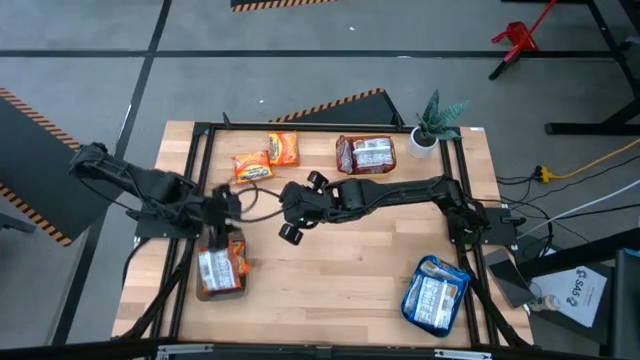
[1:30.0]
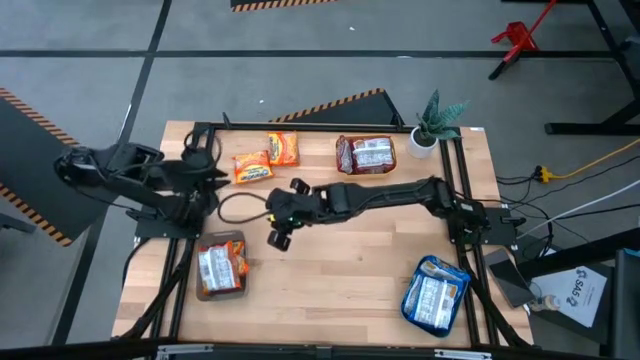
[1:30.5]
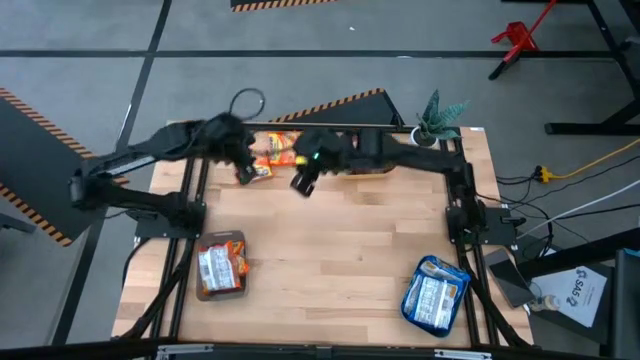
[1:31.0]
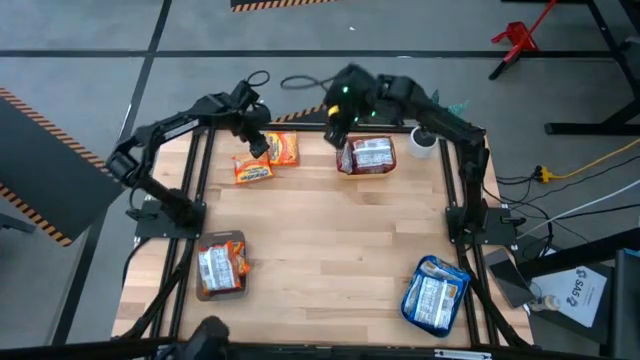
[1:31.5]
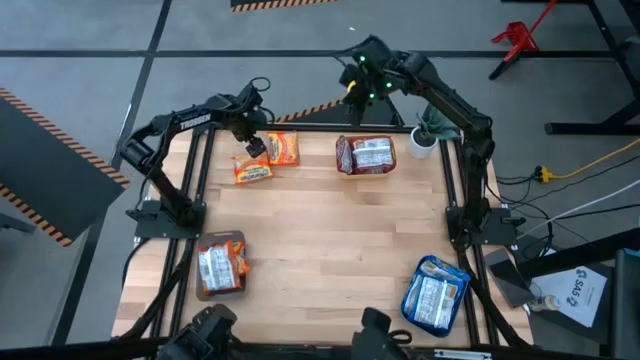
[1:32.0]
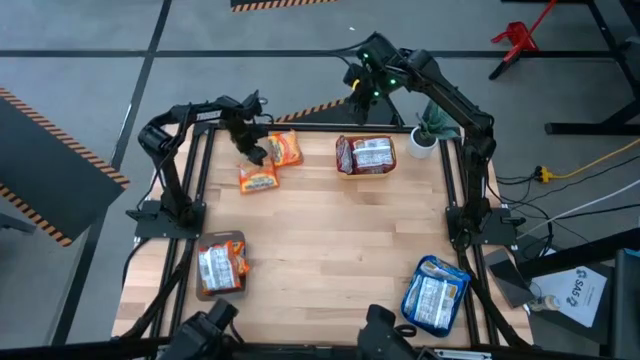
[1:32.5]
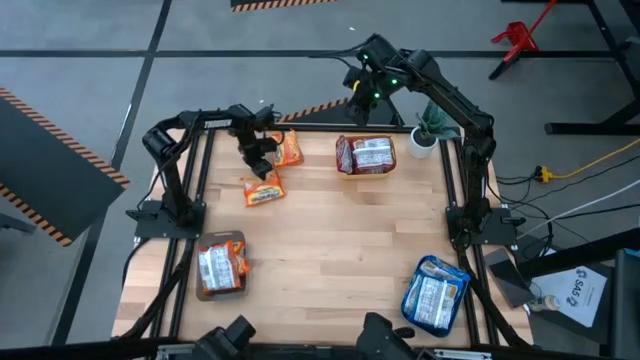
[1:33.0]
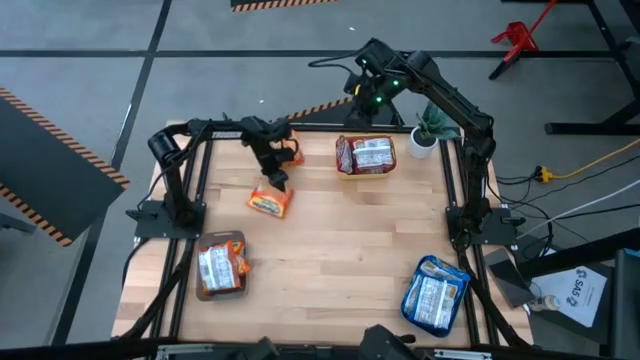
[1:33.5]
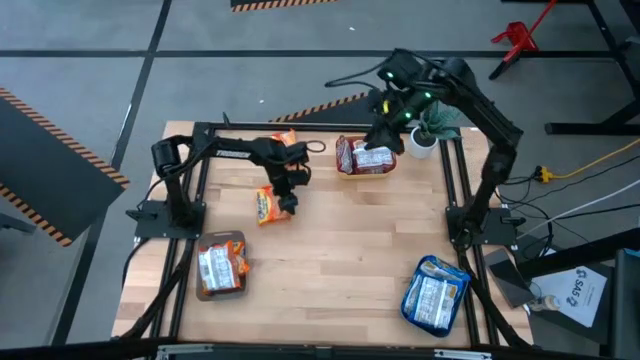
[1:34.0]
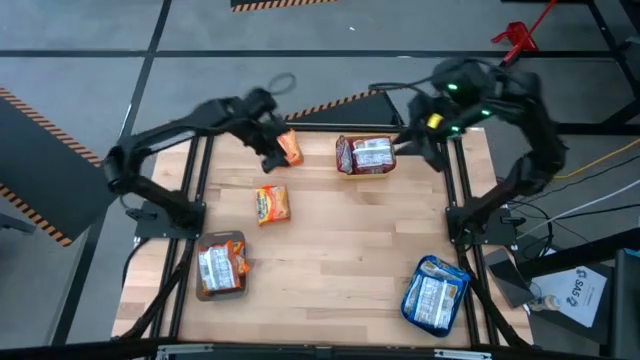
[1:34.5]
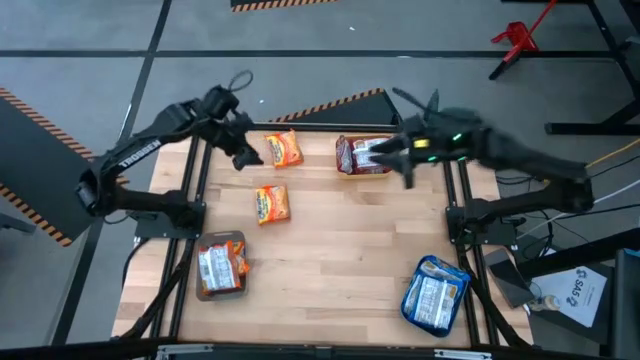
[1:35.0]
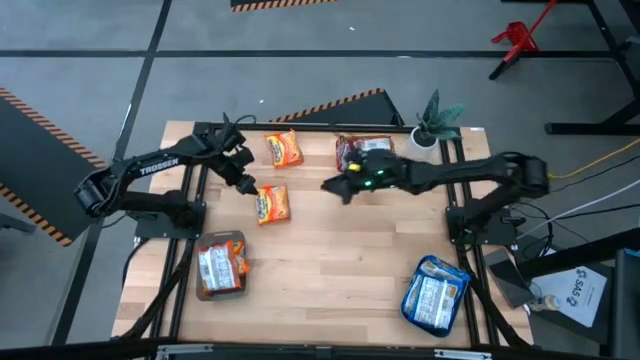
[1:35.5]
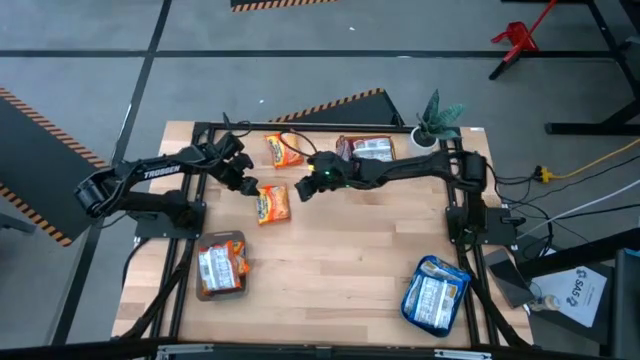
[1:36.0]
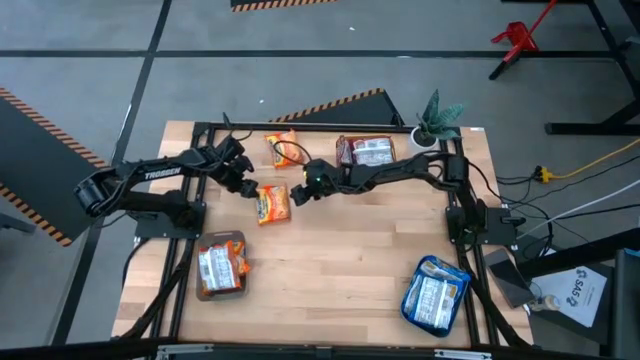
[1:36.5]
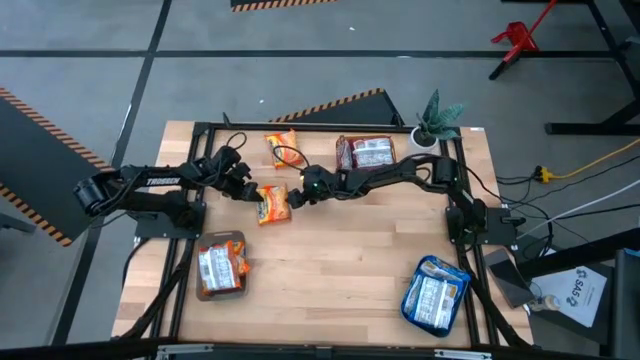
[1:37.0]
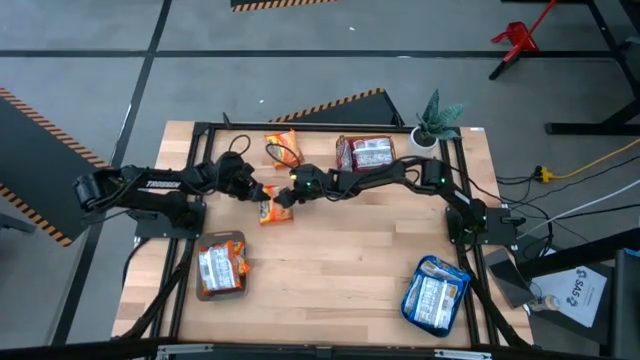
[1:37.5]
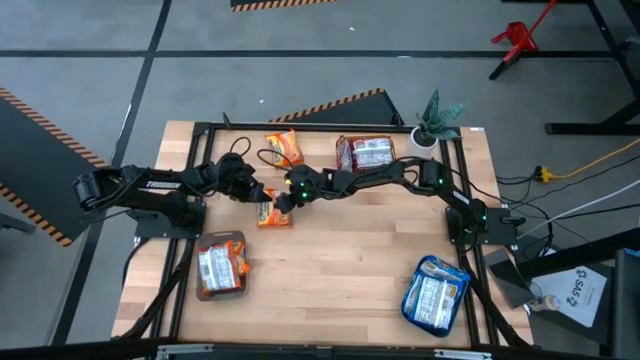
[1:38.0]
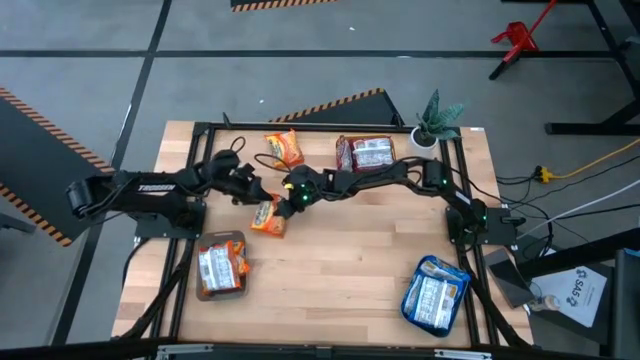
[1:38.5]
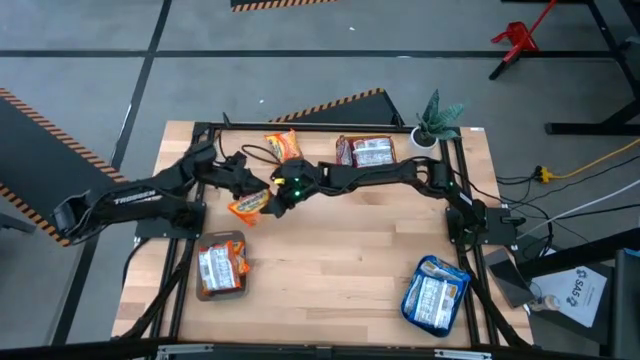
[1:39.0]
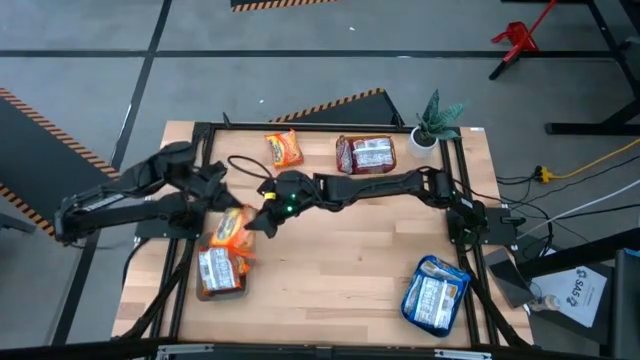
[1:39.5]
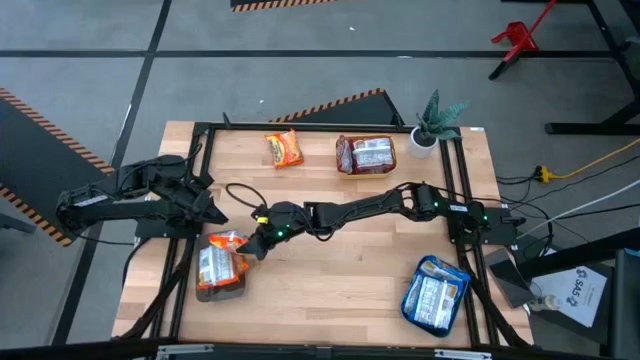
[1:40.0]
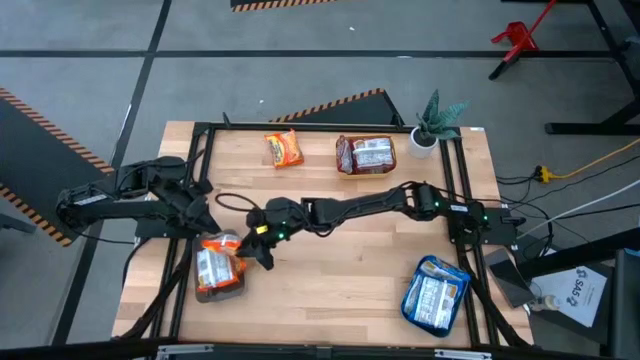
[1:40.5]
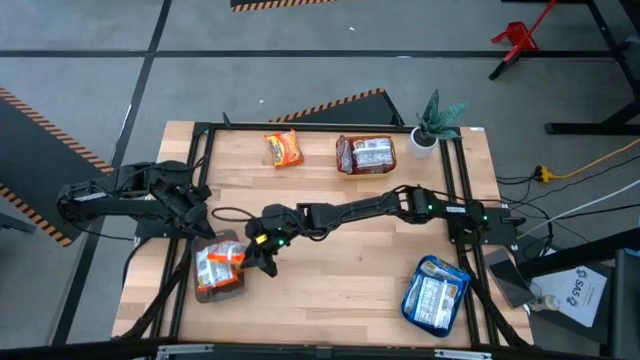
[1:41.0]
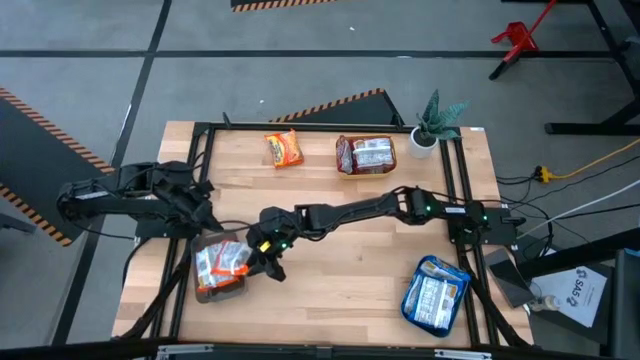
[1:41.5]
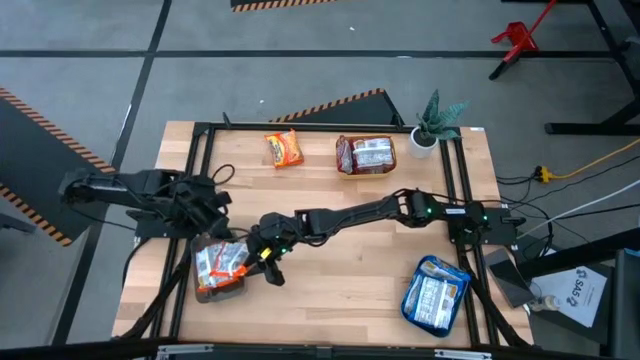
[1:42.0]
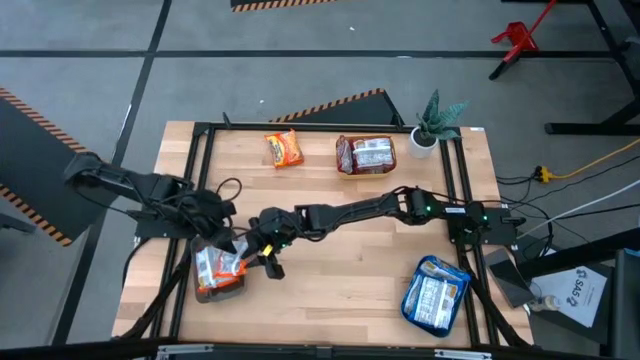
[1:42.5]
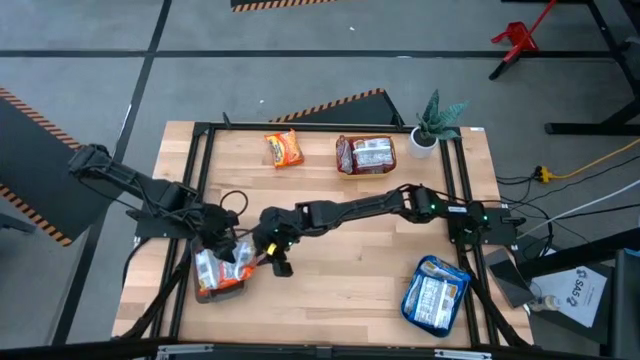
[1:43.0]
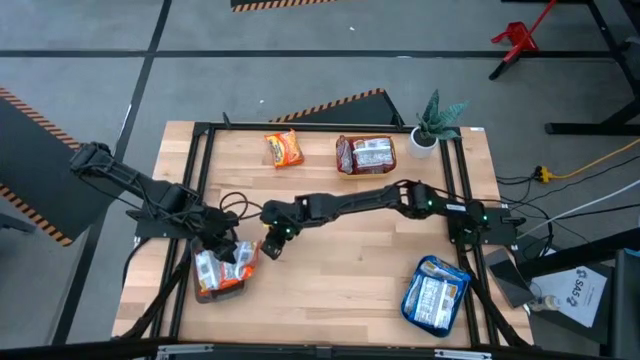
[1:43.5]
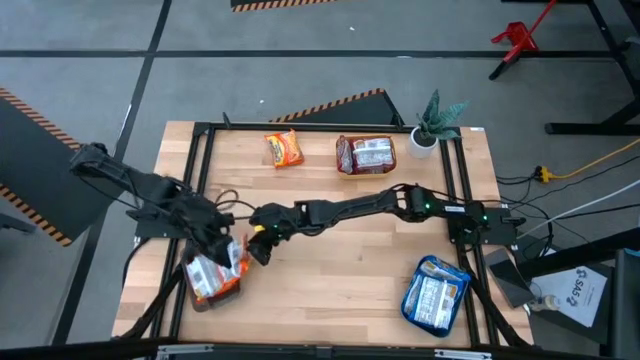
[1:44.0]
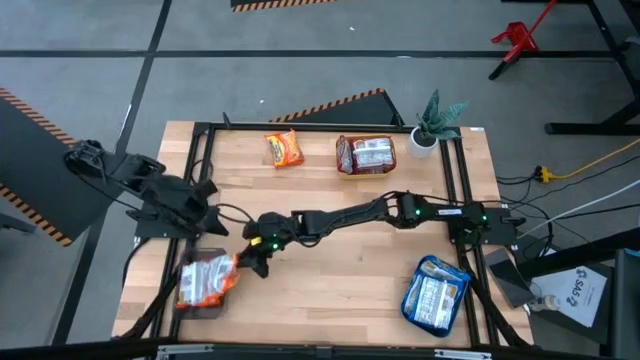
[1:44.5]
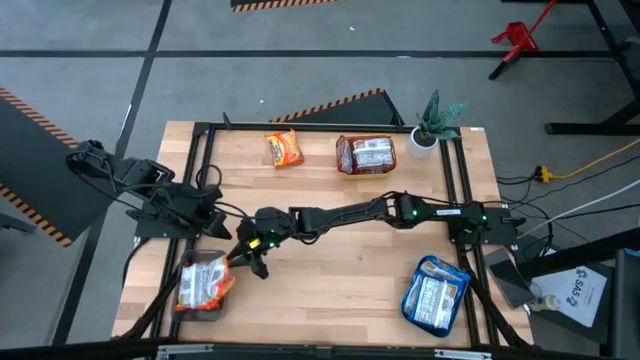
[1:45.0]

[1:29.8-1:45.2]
Task: Sort Maruchan noodles
Put the orange noodle pack into the black bin

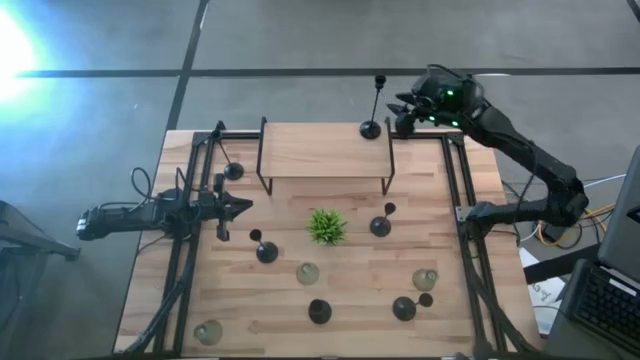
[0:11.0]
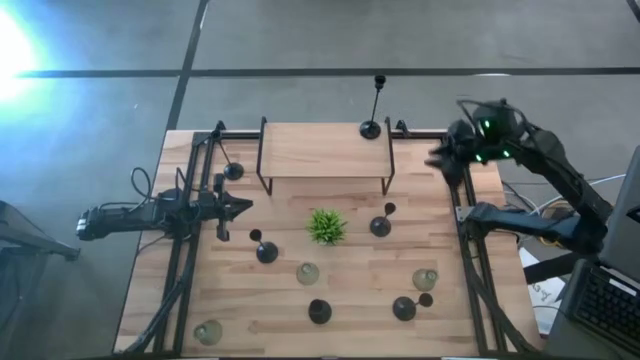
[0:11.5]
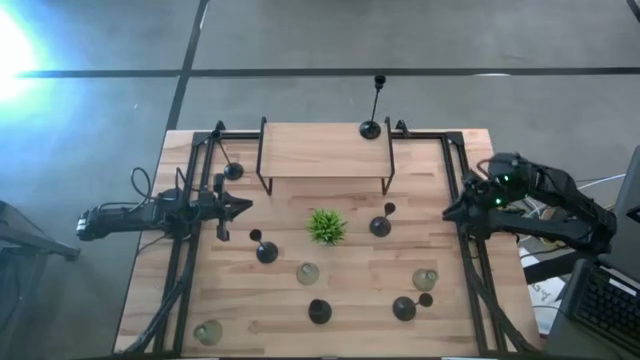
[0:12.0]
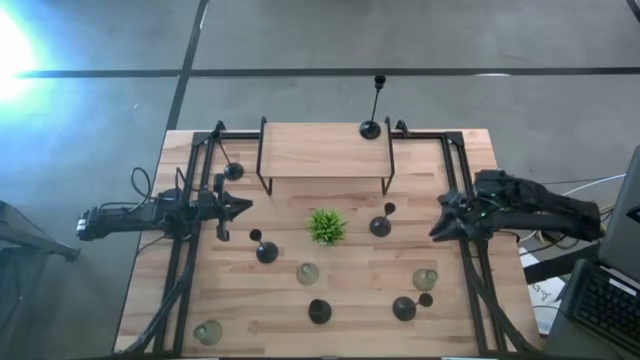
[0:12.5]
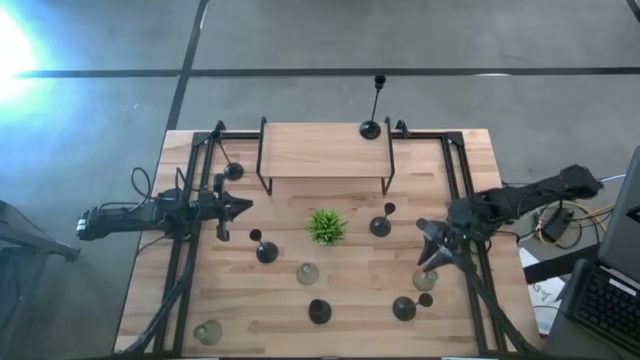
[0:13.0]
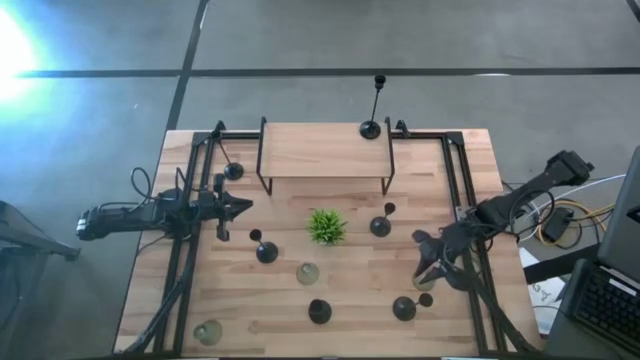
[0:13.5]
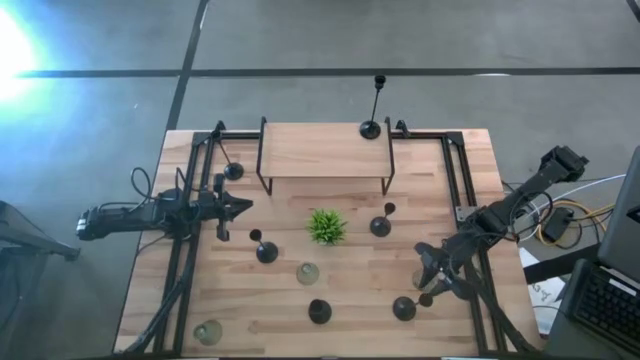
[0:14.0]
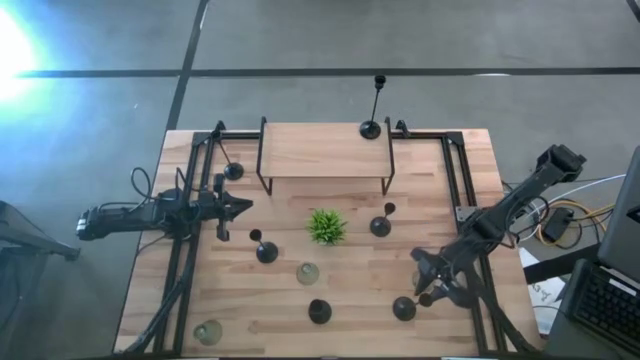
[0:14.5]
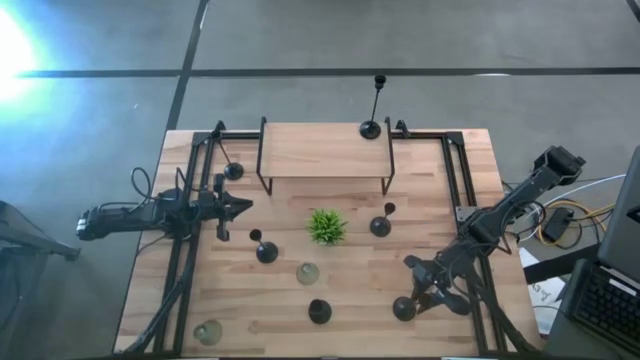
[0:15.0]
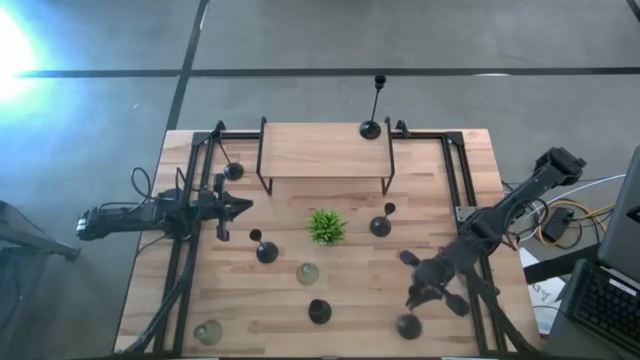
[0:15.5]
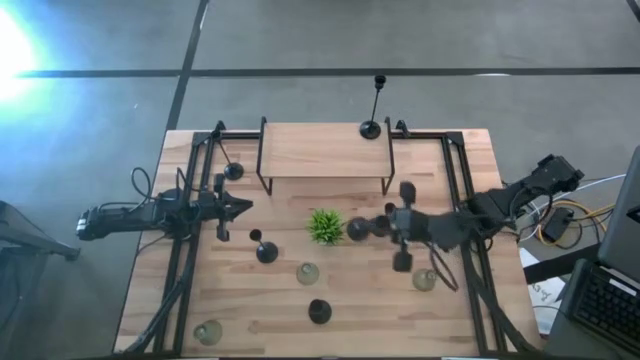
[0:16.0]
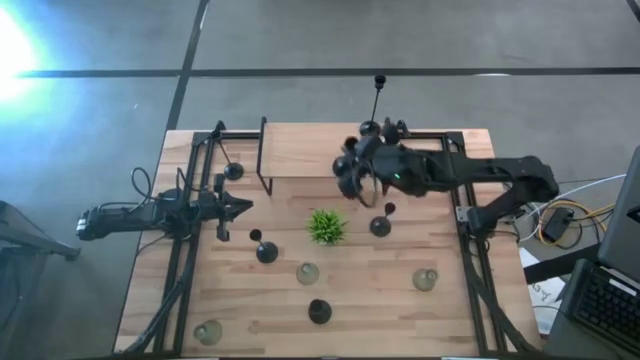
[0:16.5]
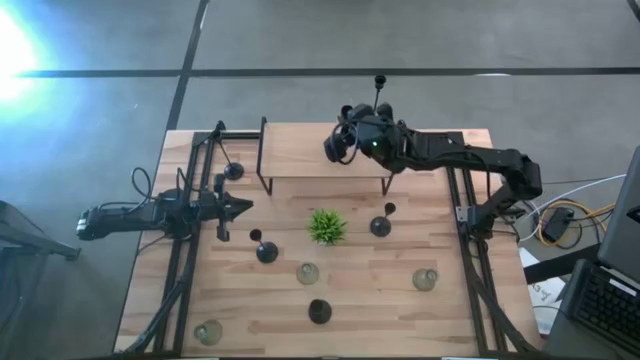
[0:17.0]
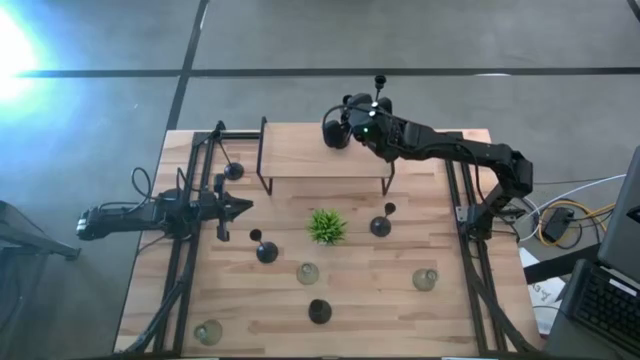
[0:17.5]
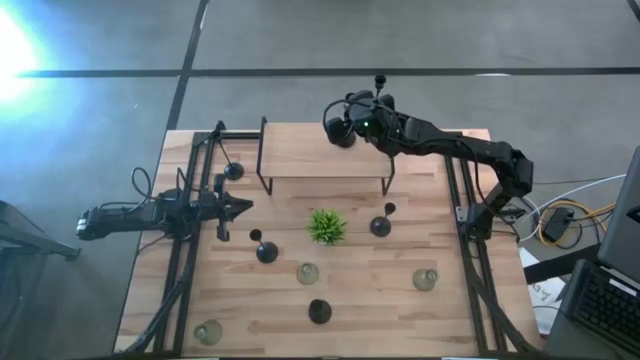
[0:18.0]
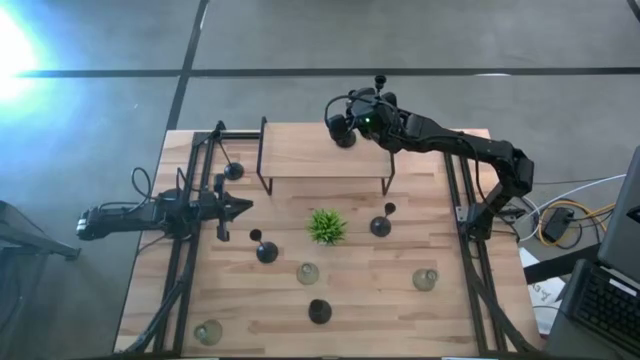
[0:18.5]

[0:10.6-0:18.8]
Task: Pick & Place candle stick holders
Put the large black candle holder on the shelf
